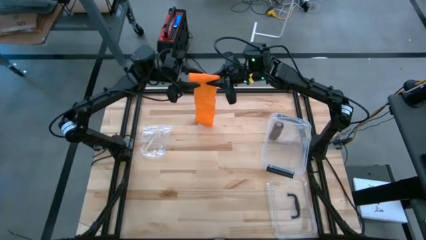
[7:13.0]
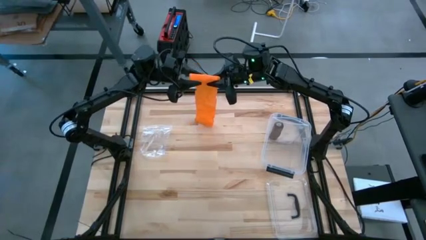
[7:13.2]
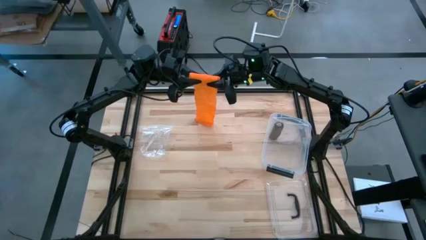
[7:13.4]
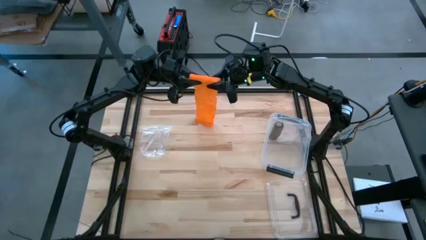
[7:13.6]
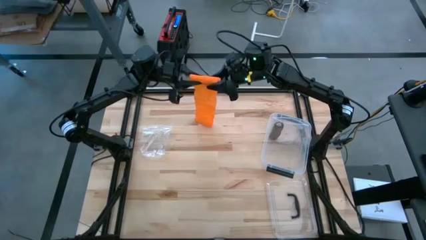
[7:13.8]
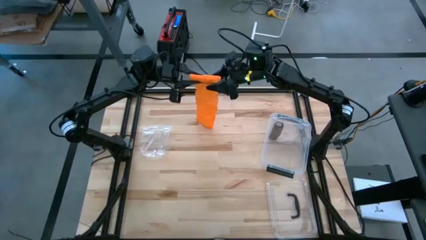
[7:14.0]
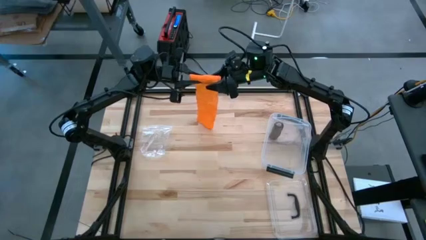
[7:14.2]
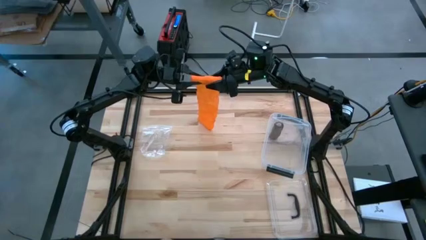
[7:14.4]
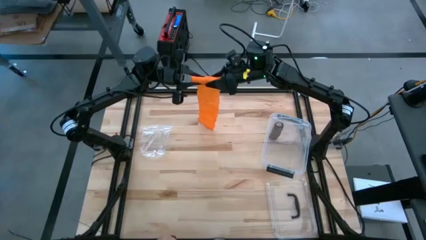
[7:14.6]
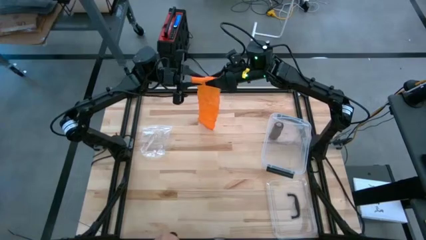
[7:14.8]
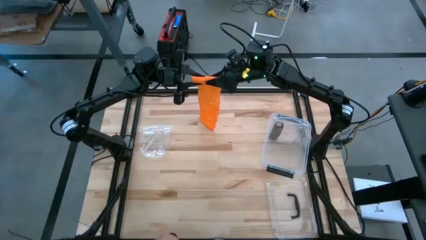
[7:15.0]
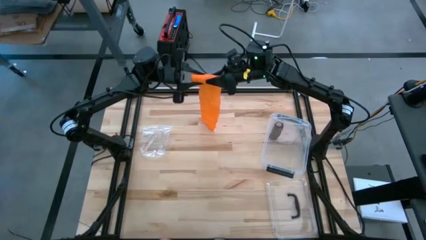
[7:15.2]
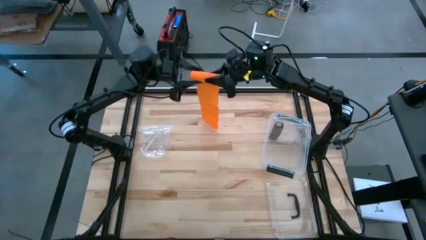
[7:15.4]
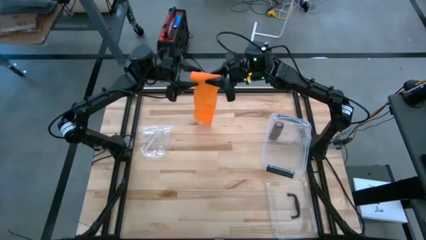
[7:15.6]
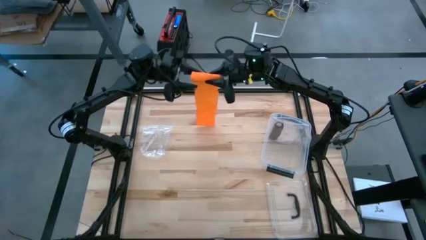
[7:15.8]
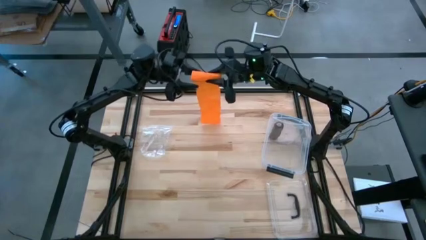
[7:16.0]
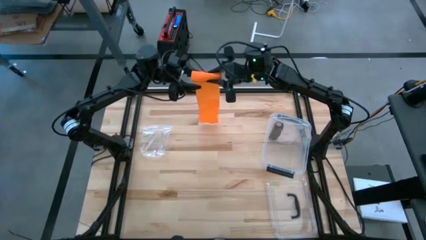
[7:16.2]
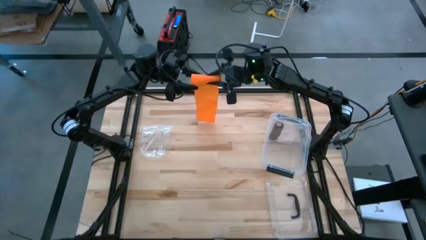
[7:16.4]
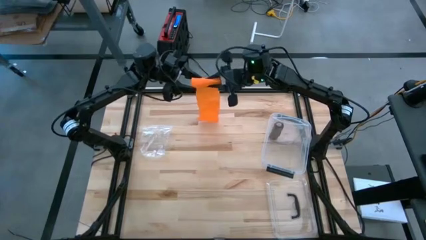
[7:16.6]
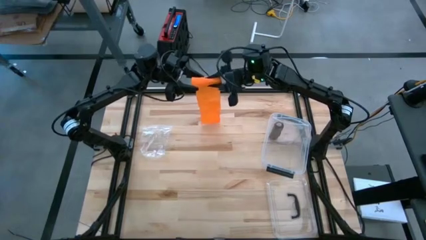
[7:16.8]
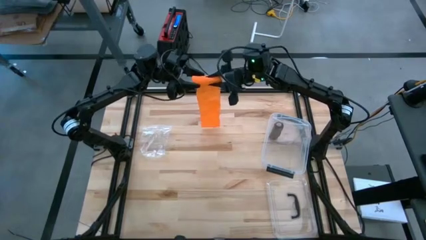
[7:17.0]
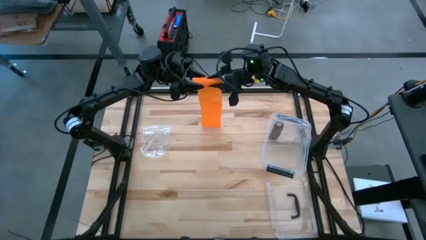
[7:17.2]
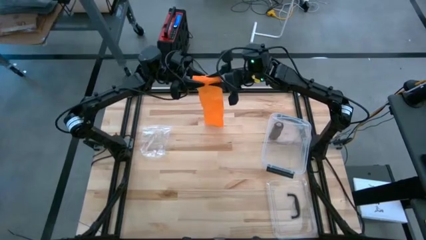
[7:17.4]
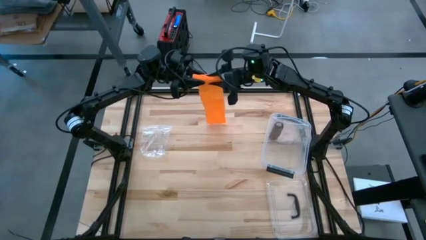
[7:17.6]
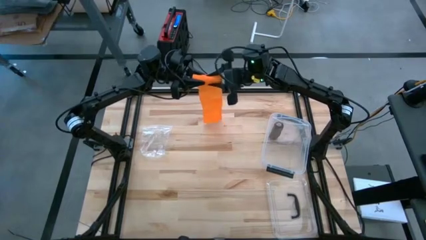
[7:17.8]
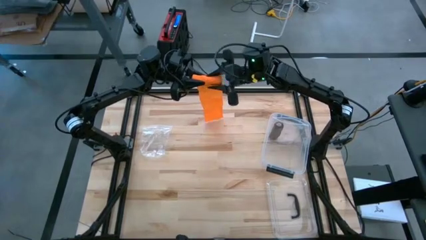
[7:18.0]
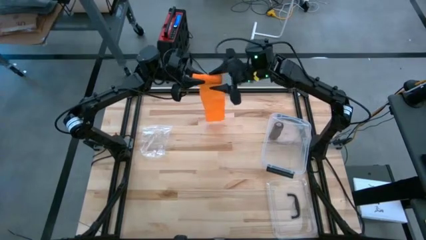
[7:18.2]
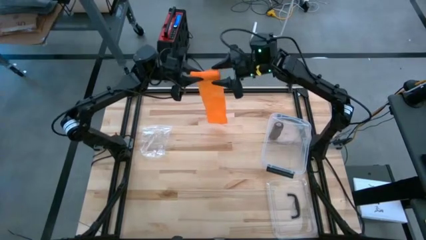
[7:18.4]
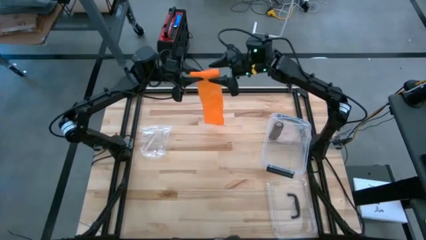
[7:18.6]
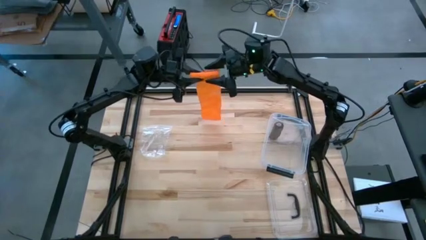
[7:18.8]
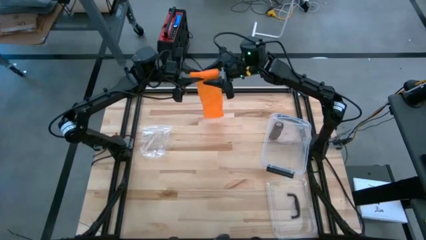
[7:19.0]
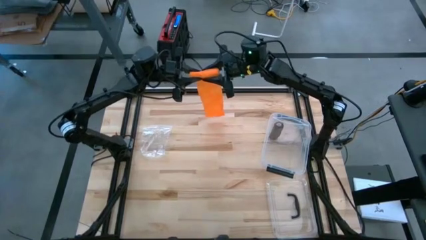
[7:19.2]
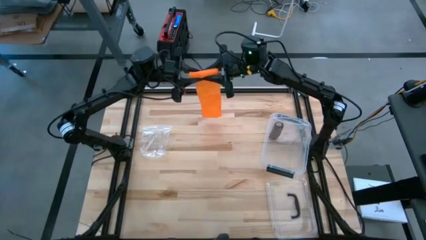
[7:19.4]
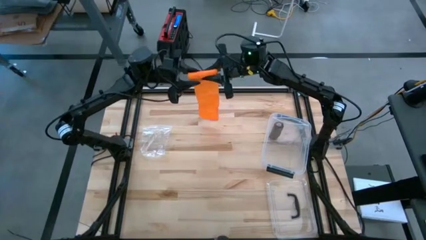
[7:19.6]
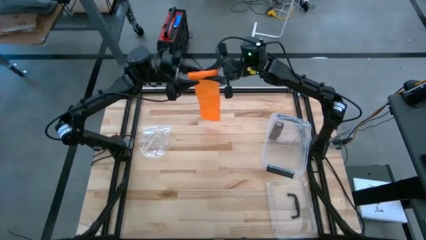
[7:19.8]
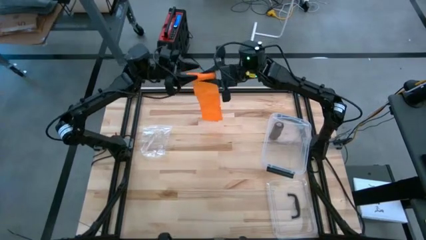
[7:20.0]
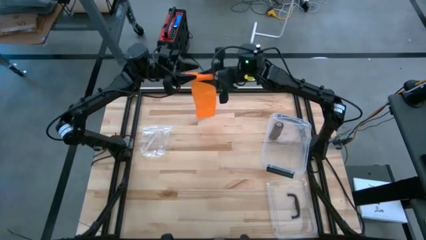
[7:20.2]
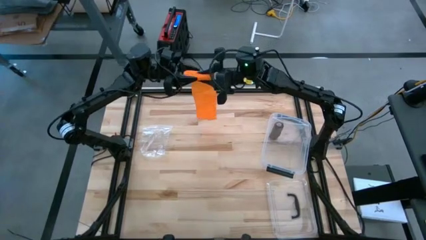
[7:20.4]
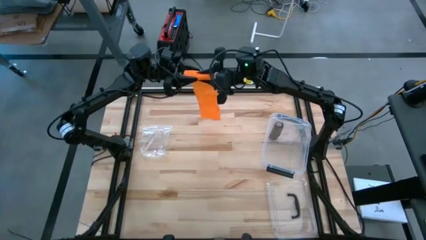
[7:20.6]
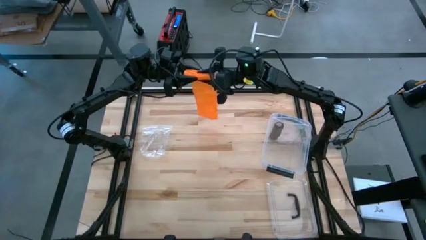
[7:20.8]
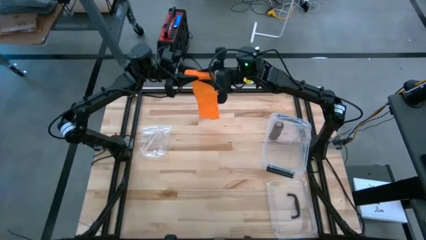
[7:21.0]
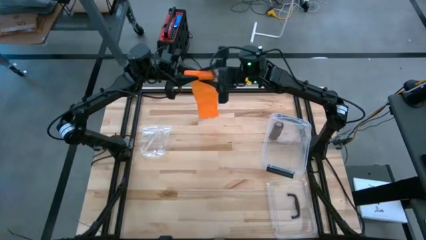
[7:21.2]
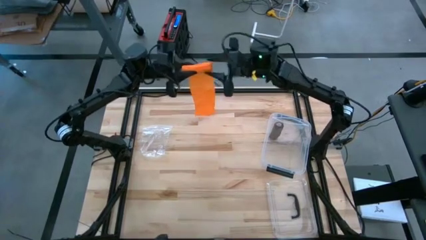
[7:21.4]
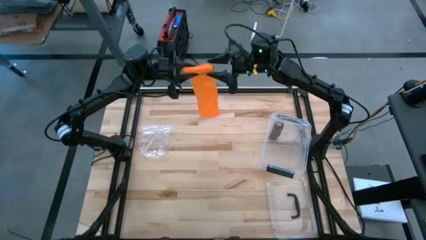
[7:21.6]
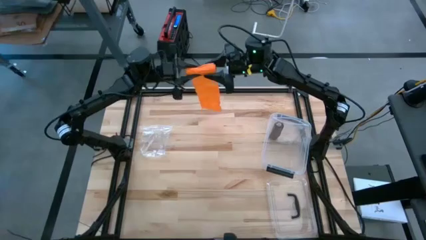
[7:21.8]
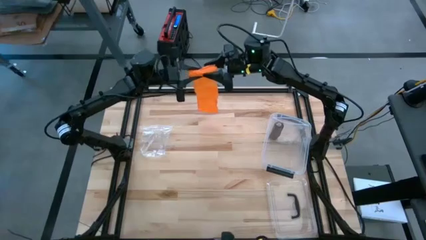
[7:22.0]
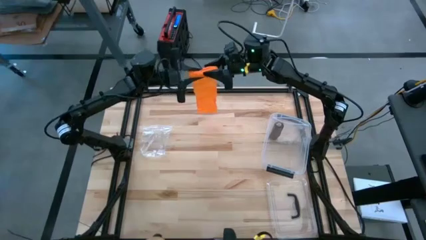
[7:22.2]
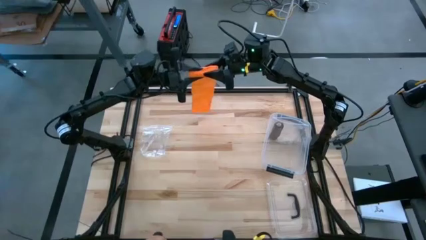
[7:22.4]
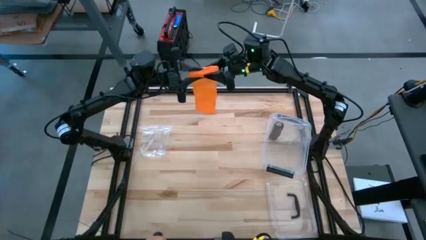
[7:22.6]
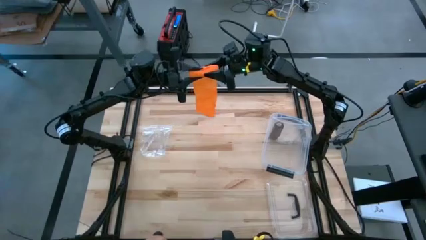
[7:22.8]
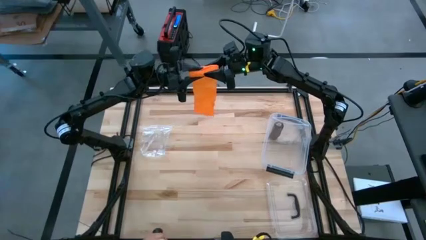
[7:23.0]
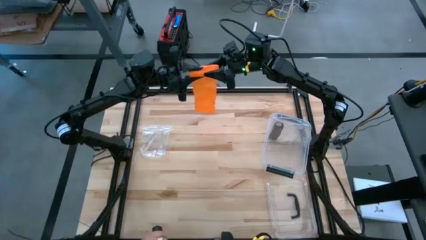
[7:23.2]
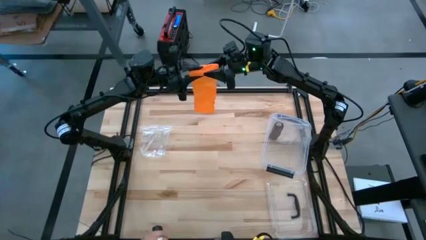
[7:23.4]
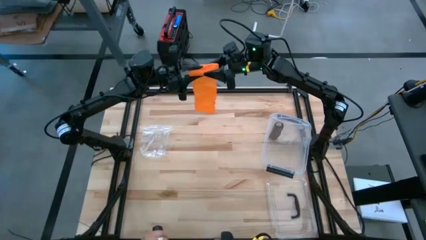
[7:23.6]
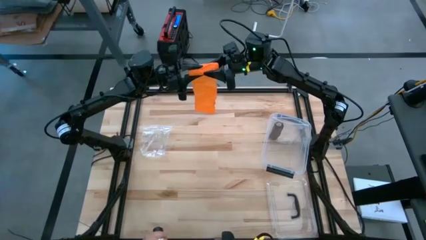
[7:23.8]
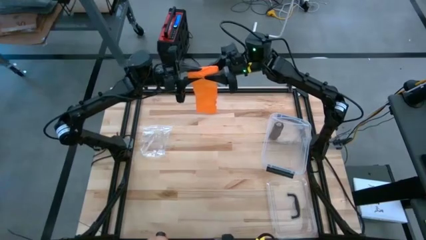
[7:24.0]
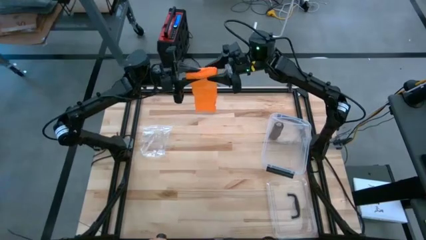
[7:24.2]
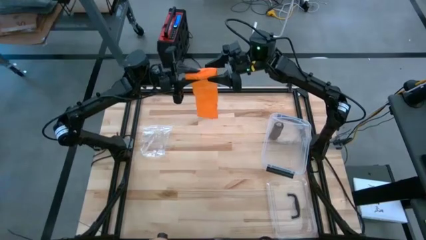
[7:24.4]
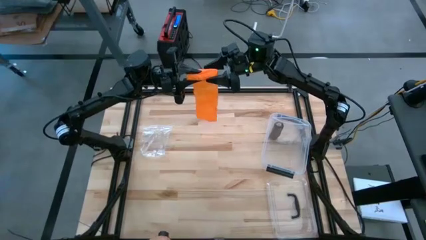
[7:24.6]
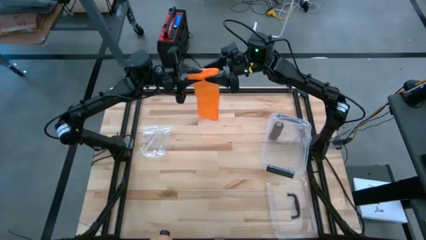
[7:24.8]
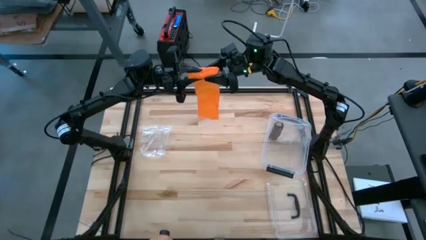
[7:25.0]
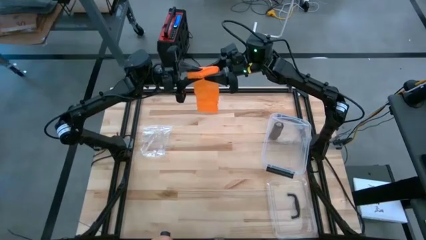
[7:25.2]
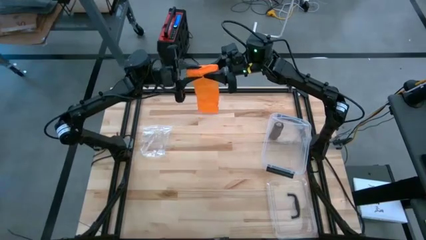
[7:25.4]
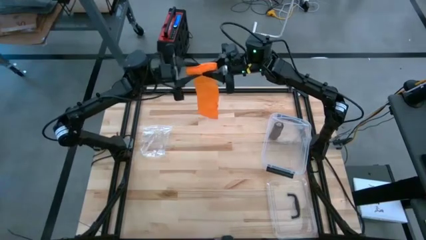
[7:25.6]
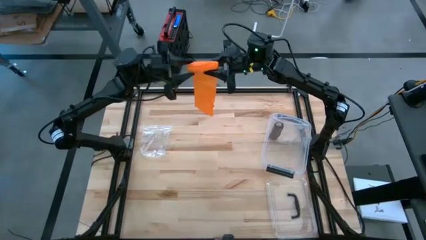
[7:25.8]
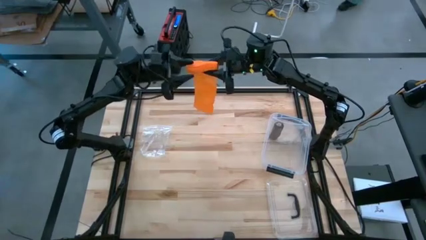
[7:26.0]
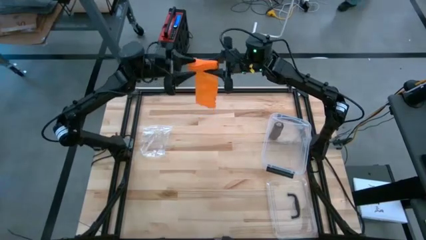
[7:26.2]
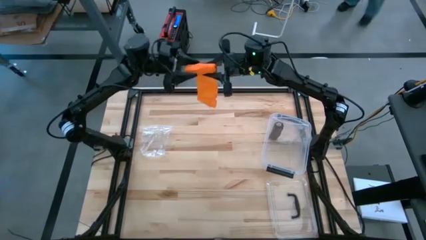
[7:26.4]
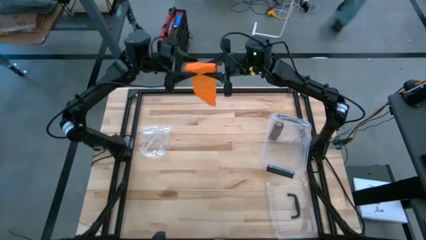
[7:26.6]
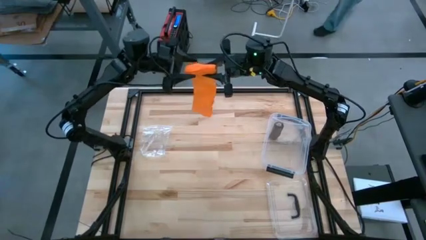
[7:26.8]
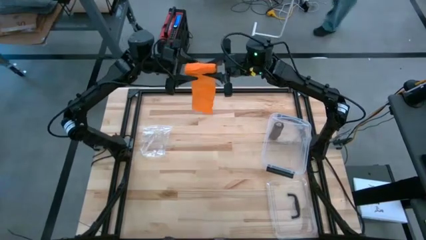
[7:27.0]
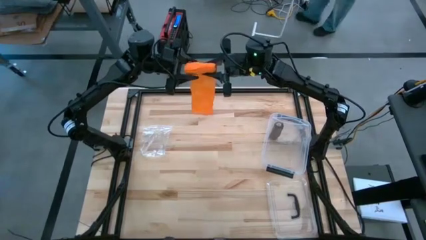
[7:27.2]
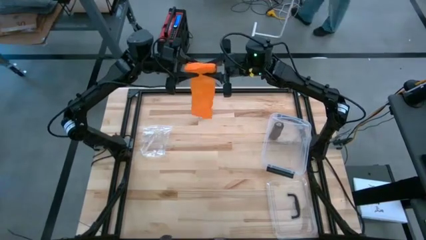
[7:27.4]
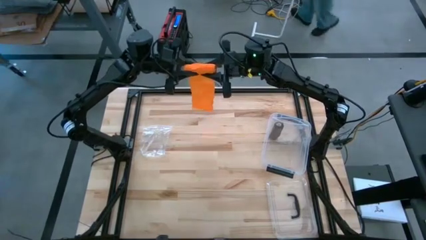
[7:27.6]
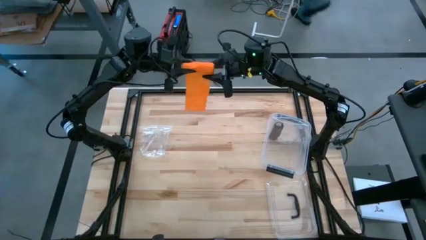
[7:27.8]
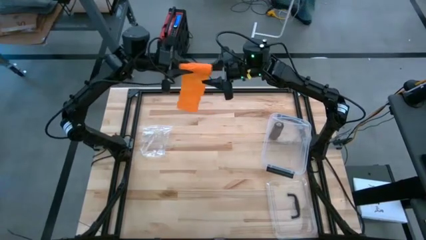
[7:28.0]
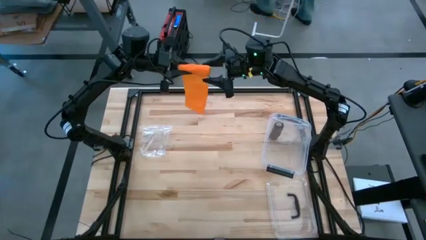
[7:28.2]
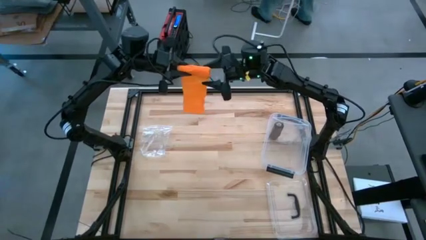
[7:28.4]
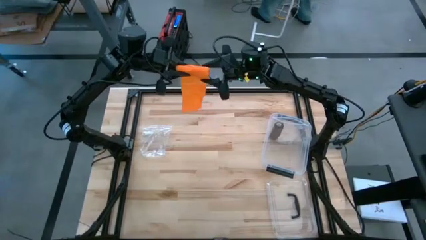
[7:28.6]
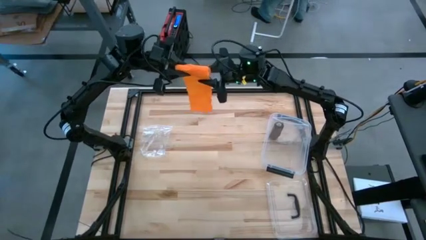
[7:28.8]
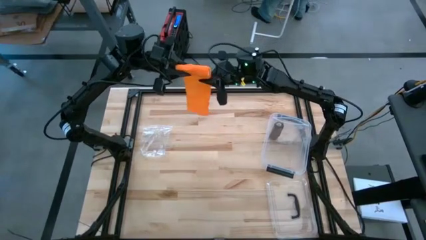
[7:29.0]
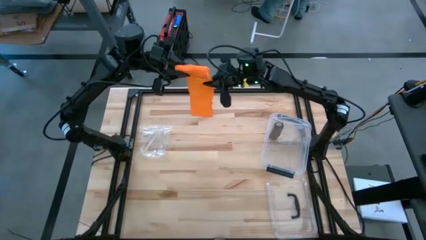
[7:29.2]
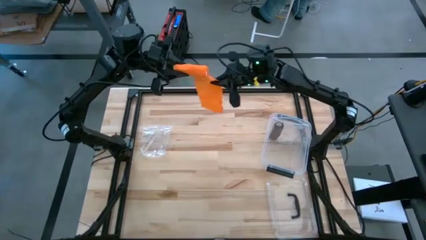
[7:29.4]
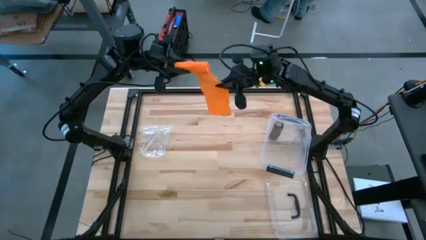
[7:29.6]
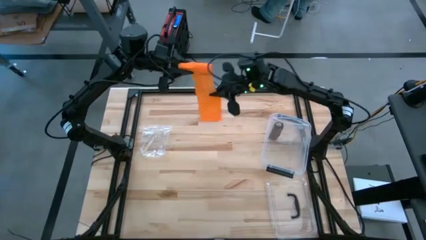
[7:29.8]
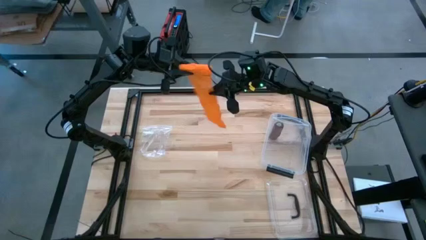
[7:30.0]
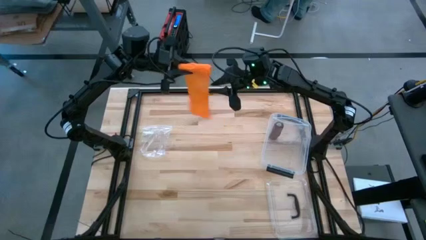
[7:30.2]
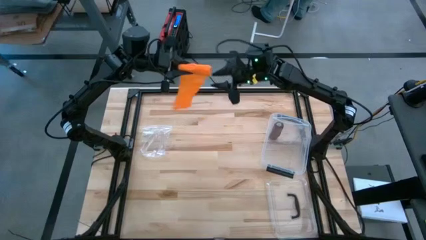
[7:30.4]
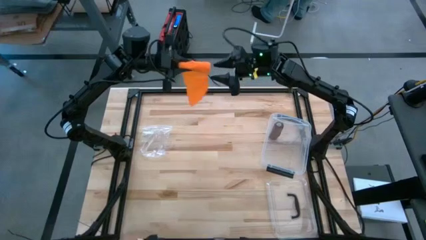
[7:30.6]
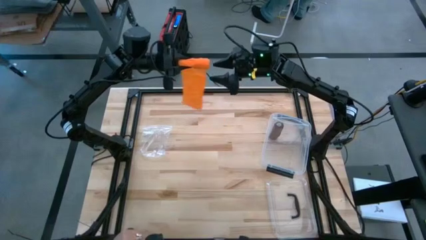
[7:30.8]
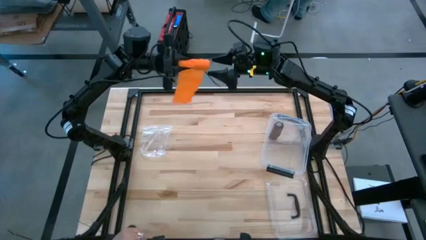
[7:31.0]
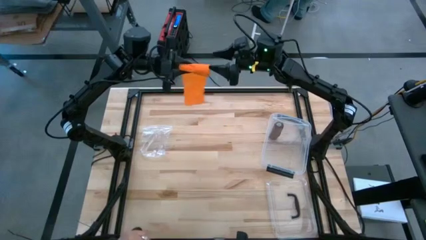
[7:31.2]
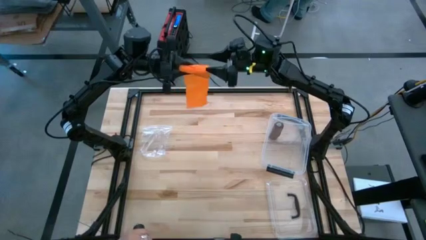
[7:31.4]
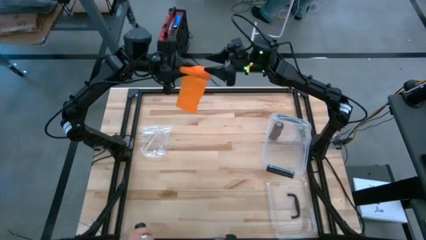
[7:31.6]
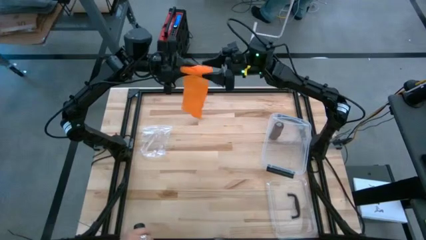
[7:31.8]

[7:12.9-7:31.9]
Task: Roll bandage
Roll the orange bandage
